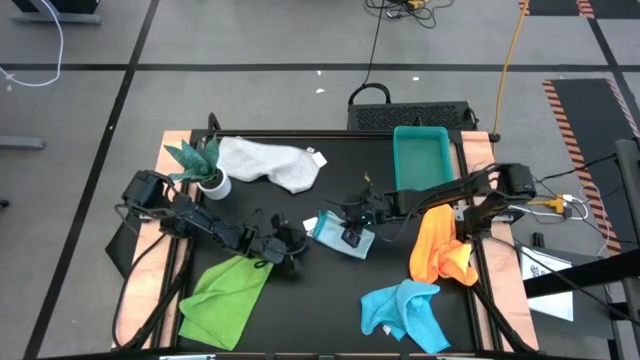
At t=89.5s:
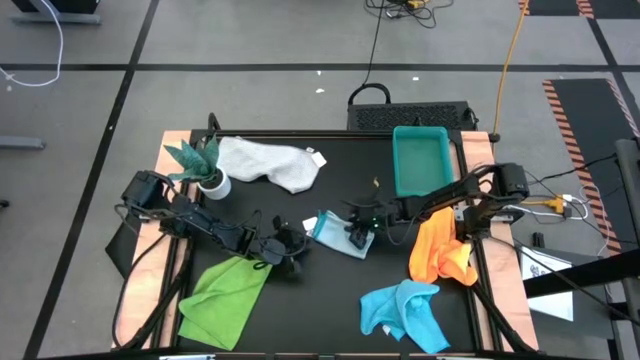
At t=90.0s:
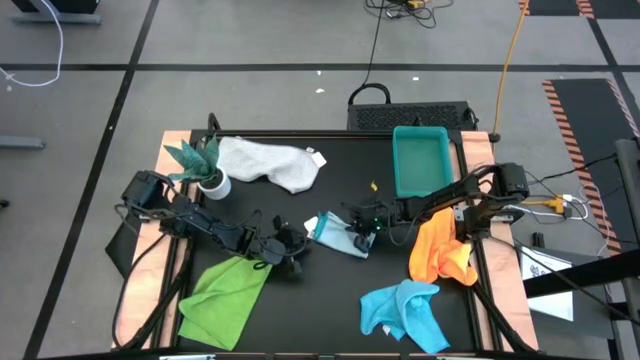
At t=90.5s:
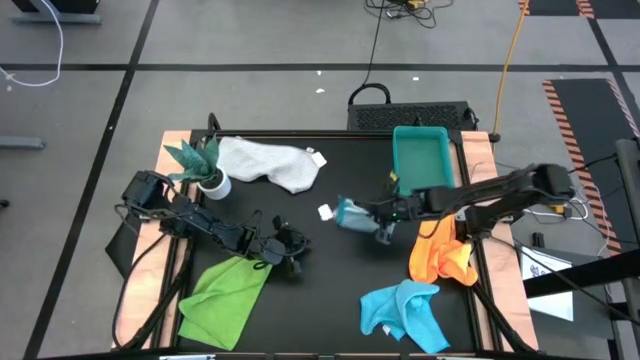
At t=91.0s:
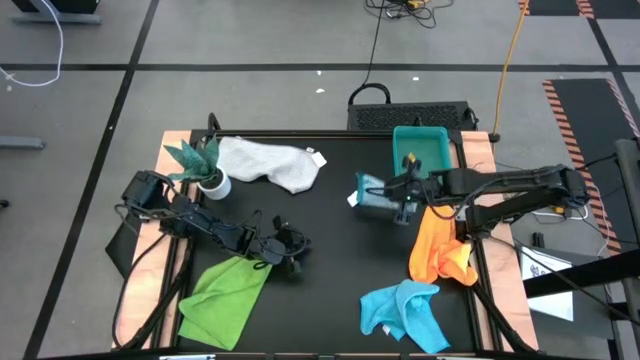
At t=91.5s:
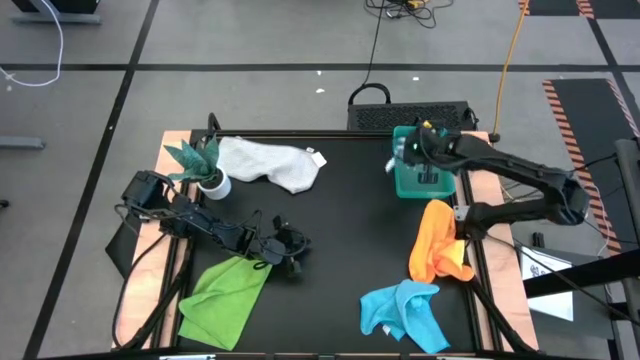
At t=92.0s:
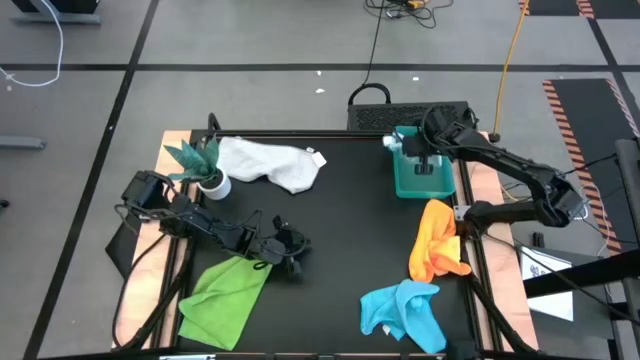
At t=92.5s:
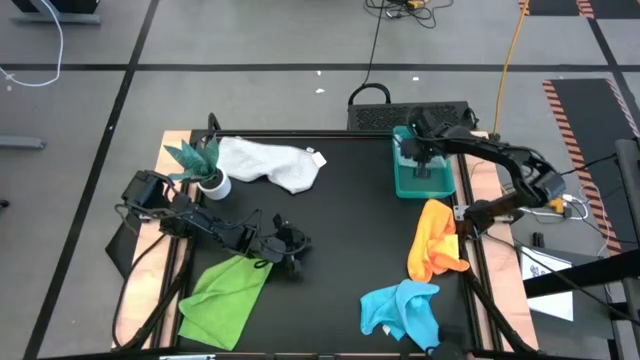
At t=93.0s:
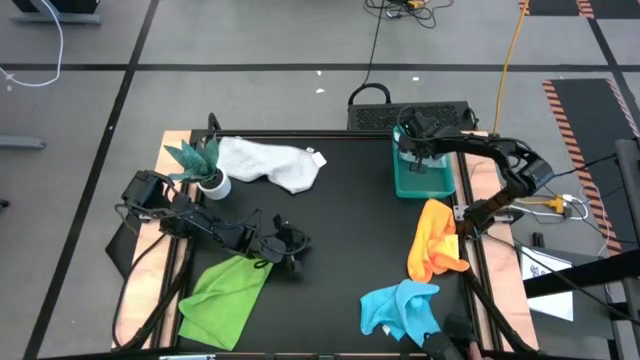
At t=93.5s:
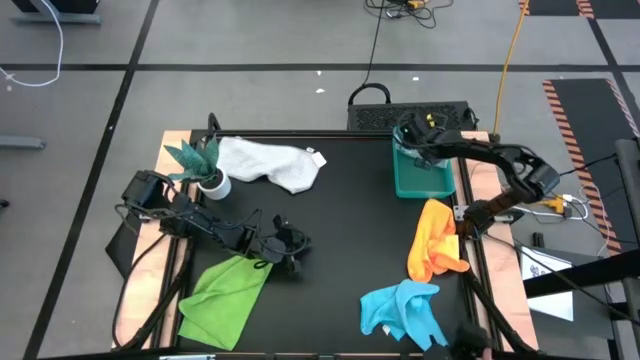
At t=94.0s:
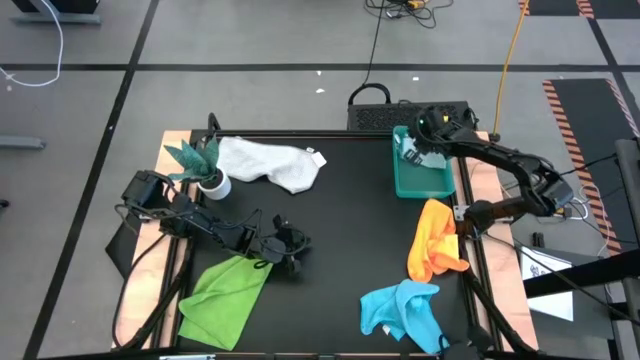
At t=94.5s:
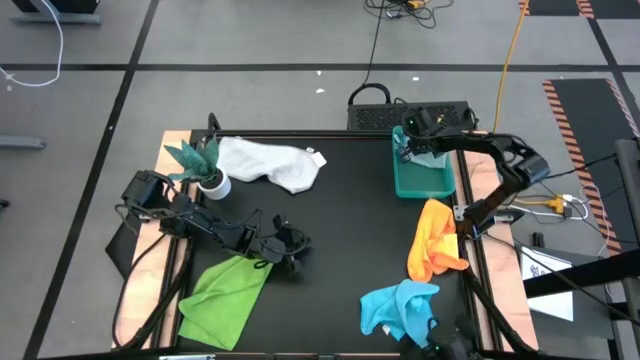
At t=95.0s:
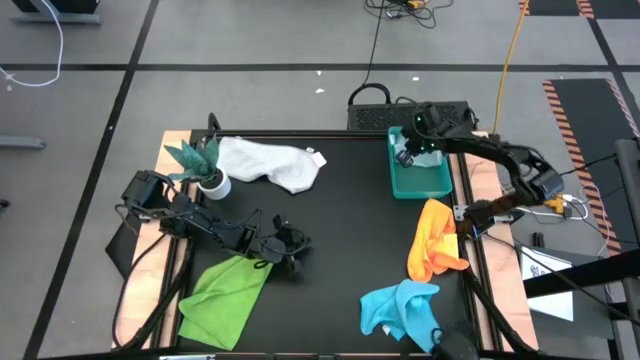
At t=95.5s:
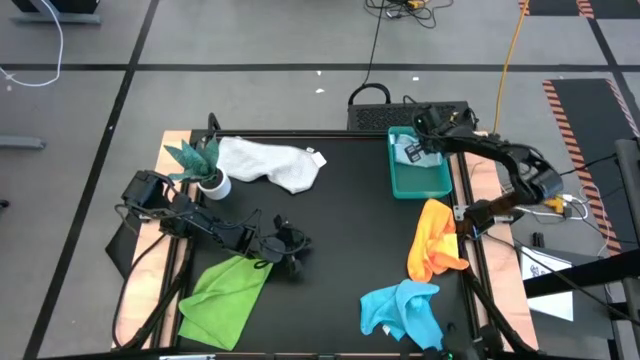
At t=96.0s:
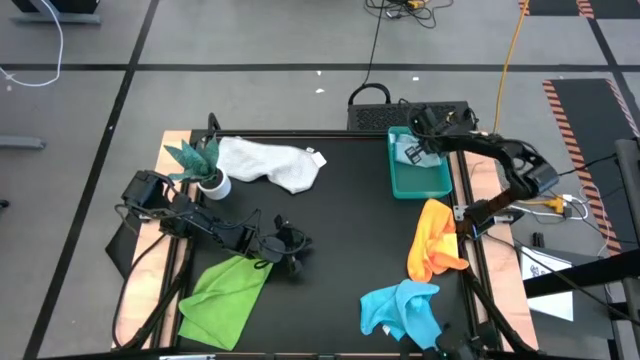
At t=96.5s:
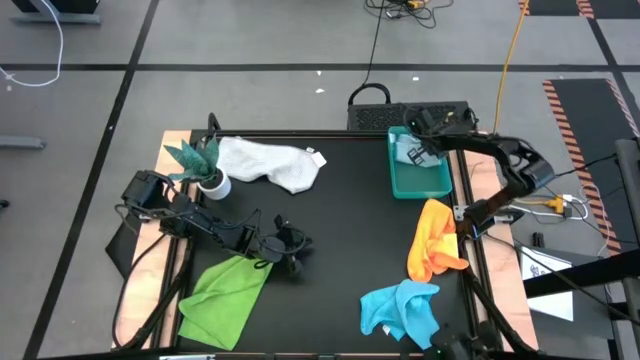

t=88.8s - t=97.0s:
Task: Fold microfiber towels
Put the light blue microfiber cloth into the green bin

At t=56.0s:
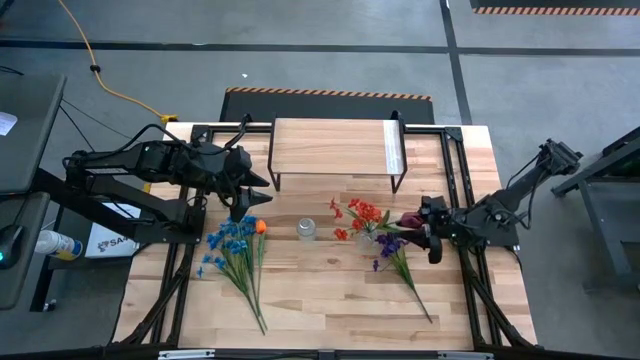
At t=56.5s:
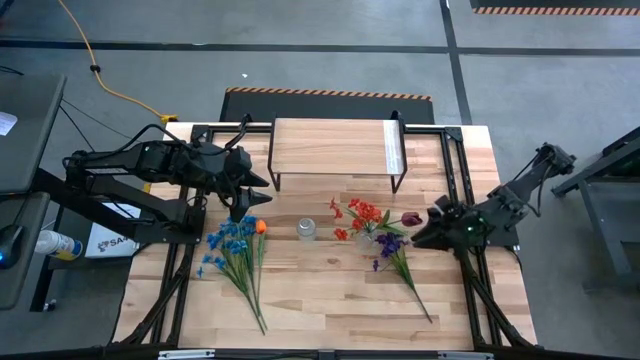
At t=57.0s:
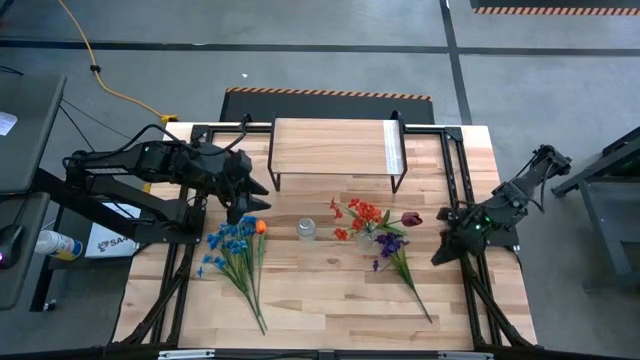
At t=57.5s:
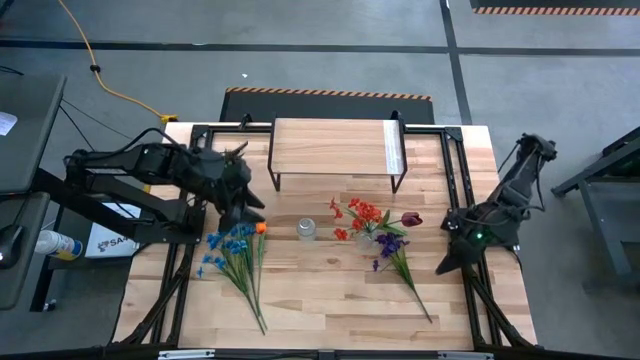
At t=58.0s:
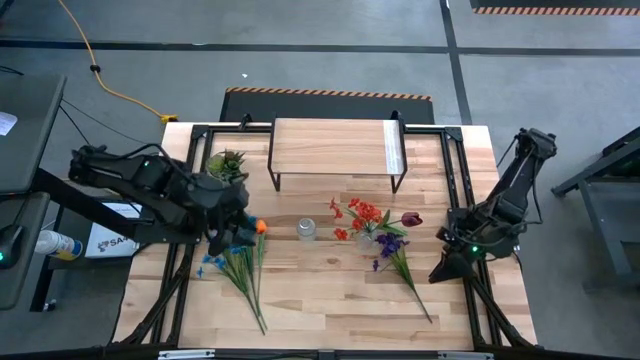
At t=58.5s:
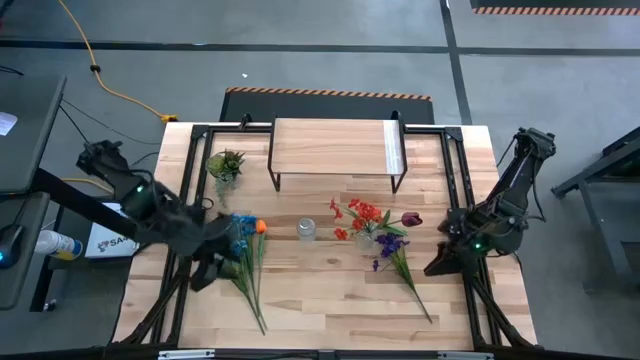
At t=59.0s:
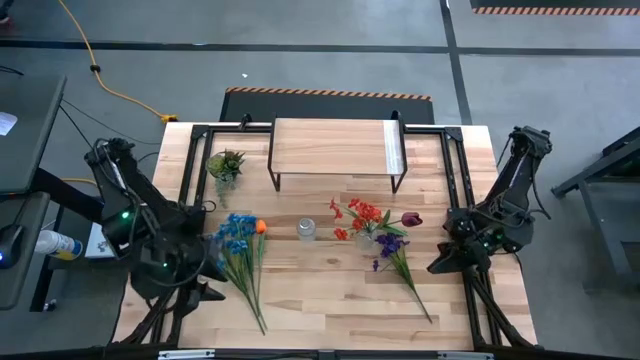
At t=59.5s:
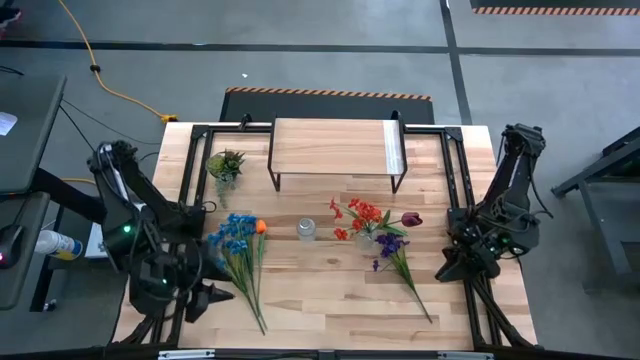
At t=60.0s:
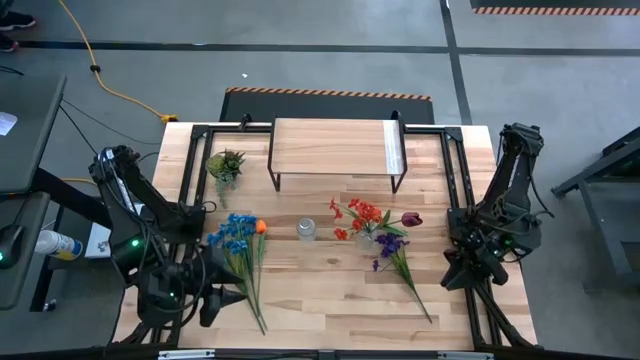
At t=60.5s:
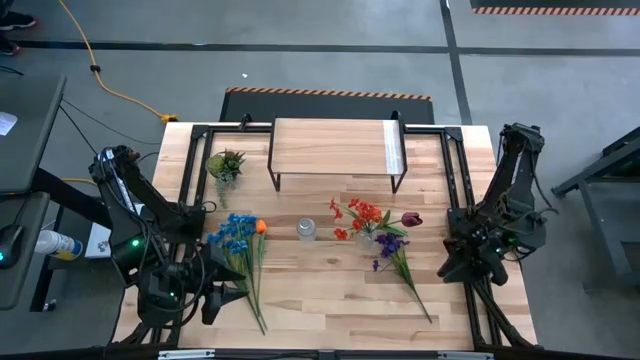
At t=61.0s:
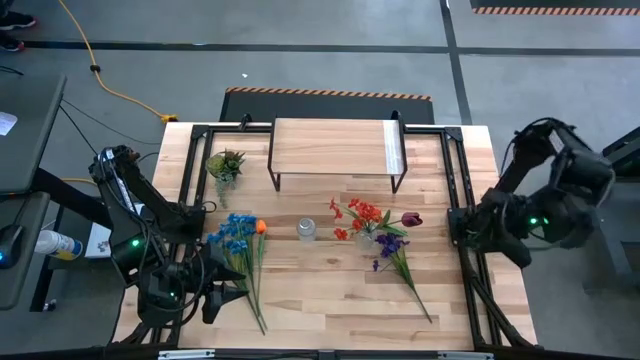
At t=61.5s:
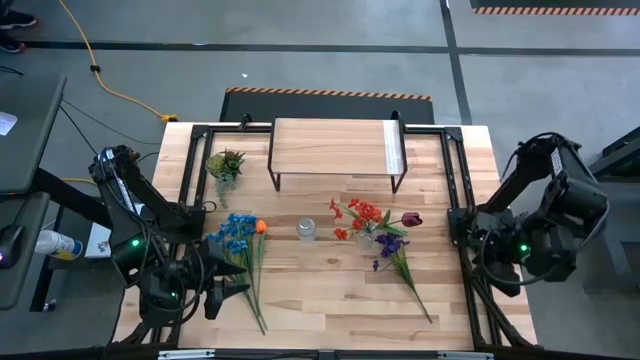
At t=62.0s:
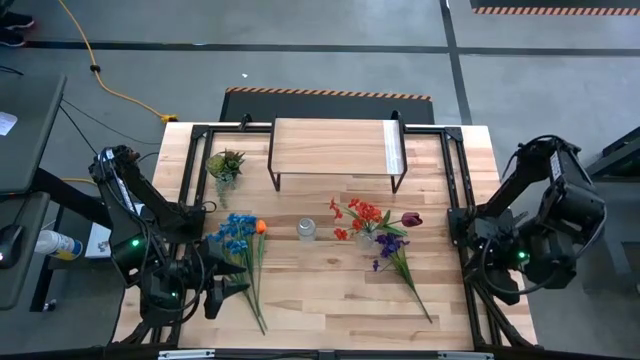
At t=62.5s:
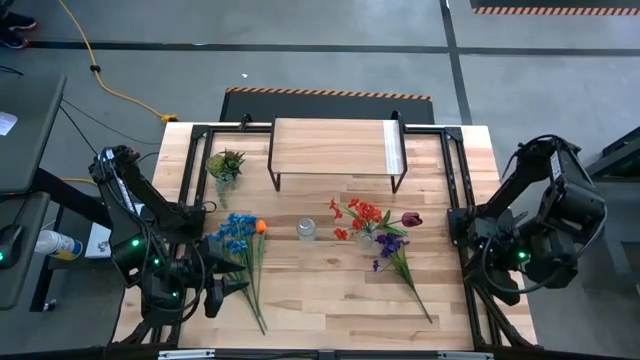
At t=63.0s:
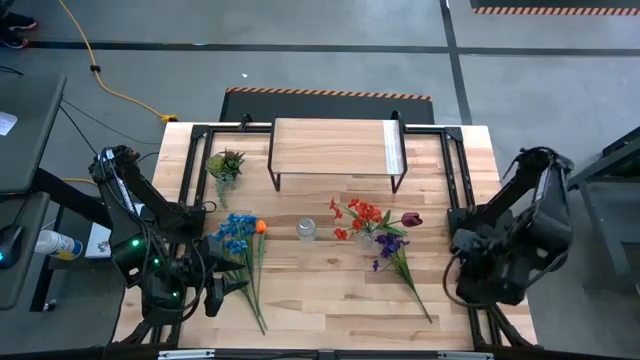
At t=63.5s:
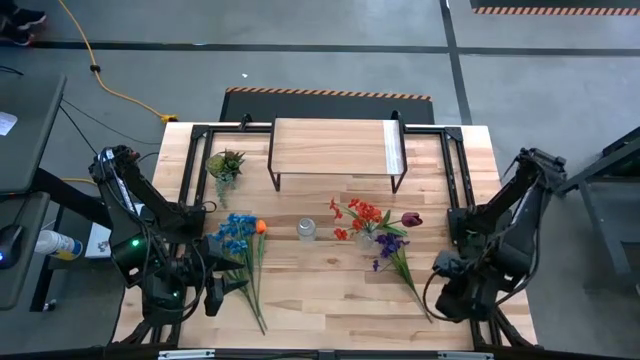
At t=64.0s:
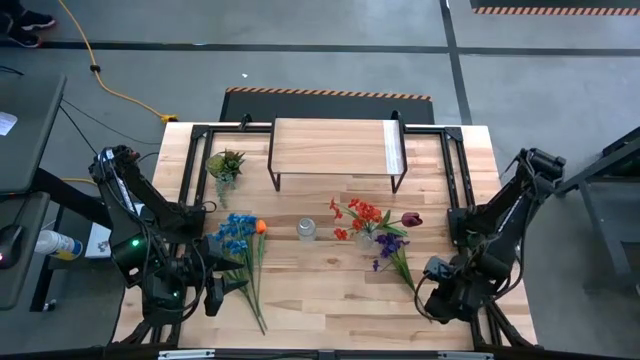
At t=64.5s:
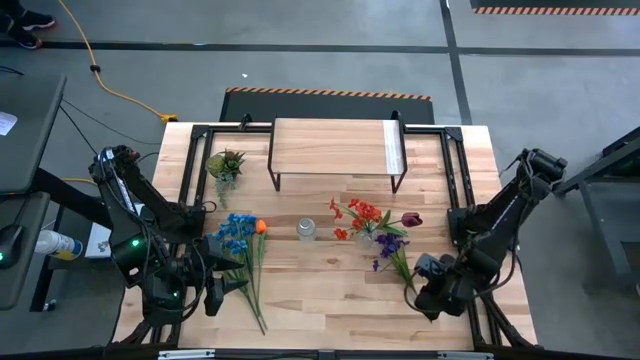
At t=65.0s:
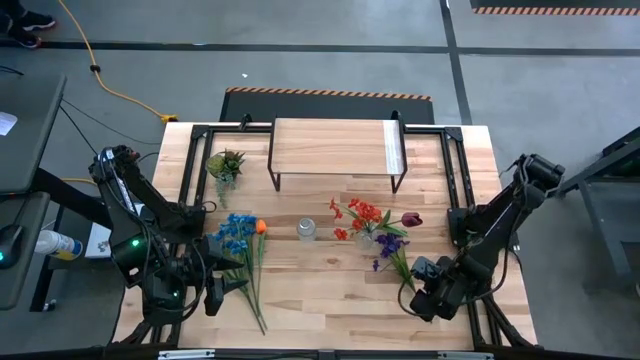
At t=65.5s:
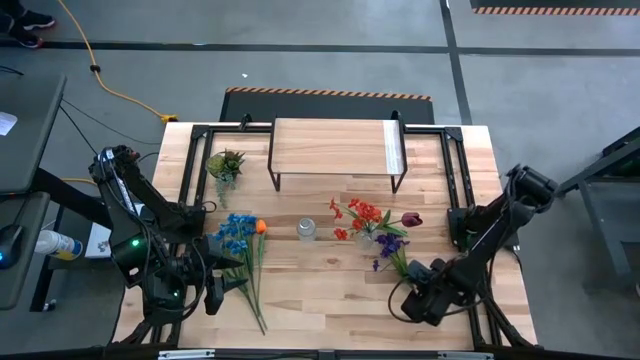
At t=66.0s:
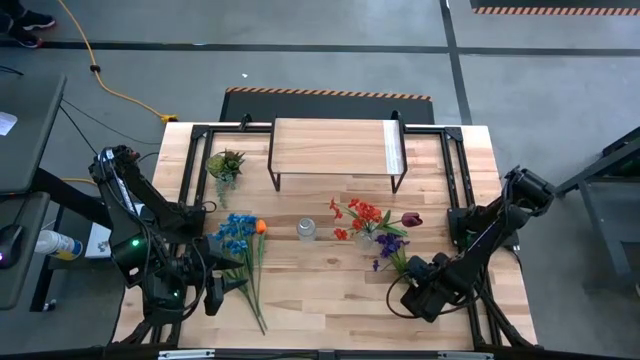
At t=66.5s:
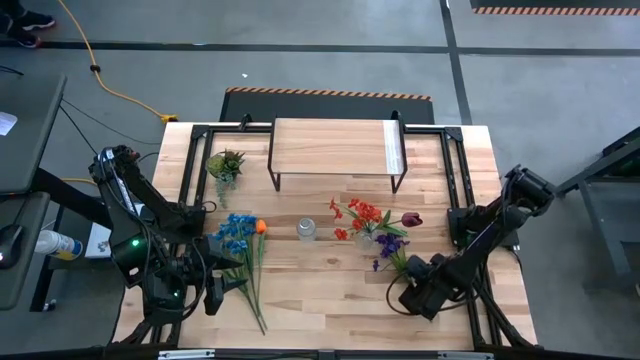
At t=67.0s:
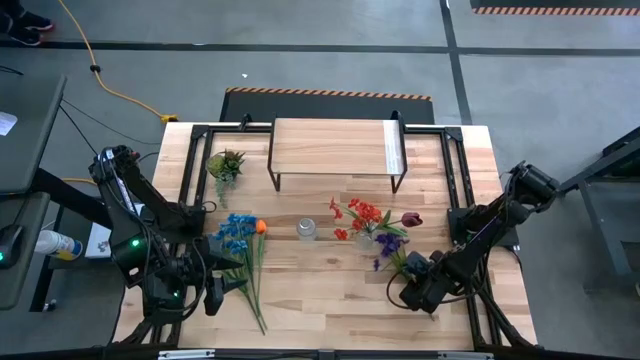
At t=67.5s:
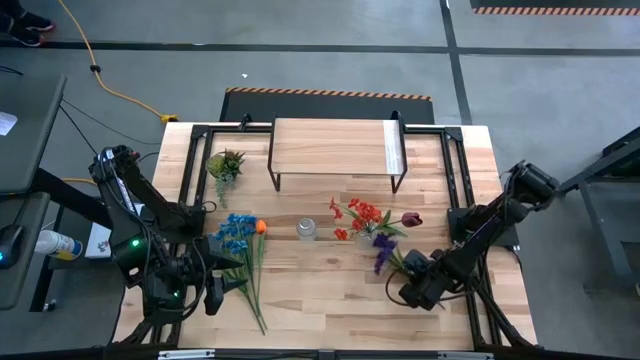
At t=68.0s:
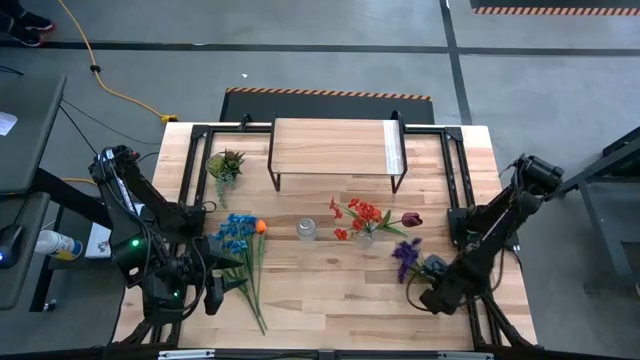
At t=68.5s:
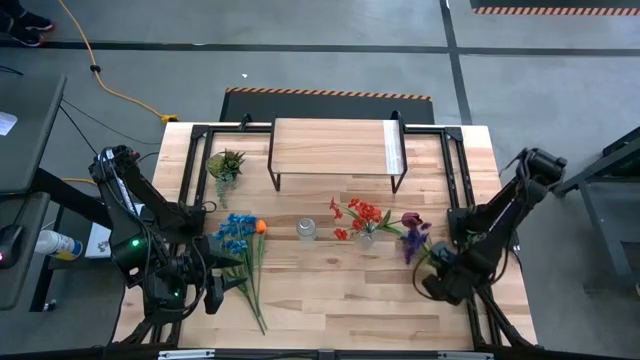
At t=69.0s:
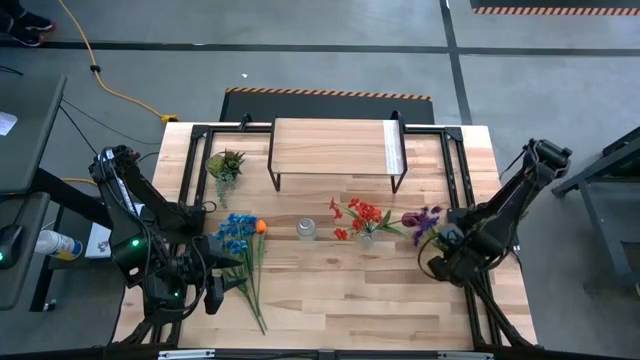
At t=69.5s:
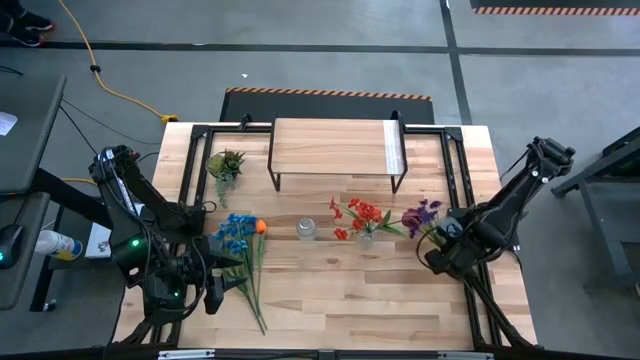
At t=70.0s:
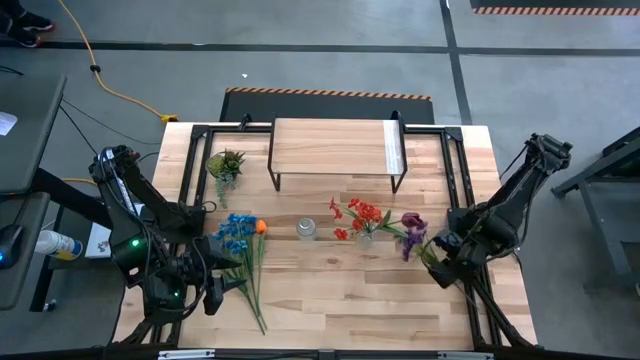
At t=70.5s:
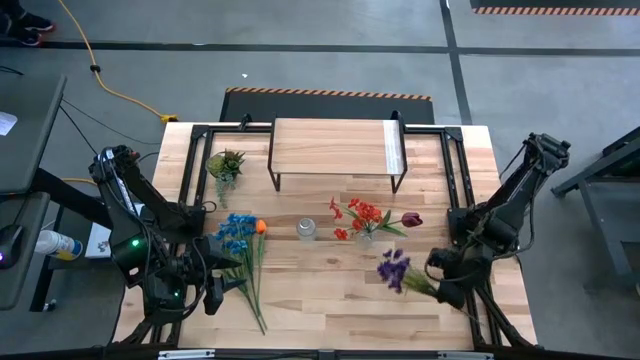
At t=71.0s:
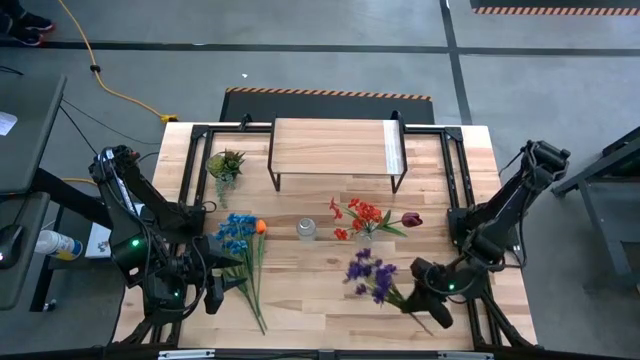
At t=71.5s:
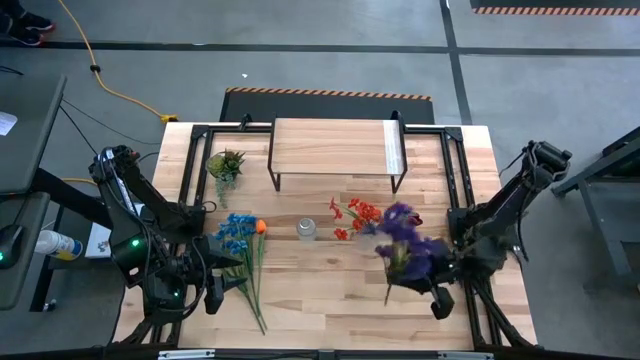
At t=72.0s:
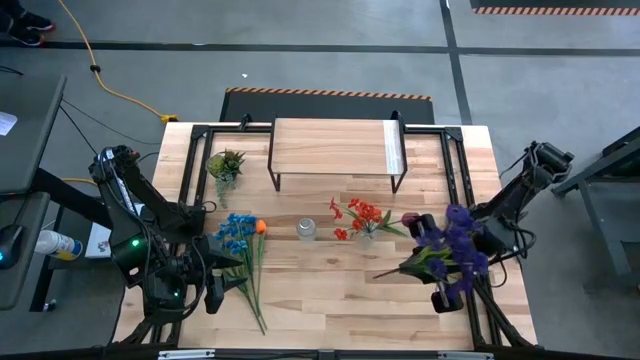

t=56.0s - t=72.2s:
Task: Pick and place flowers into a vace then onto a shelf
Put the purple flowers into the right transparent flower vase
